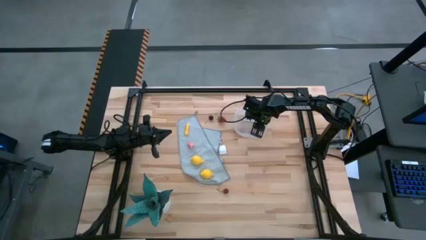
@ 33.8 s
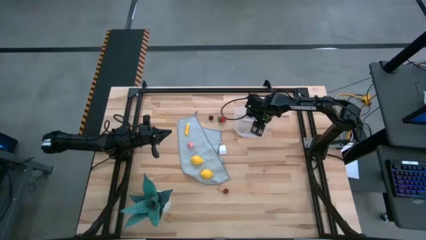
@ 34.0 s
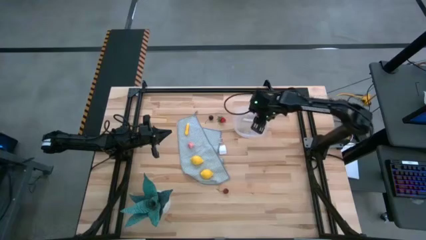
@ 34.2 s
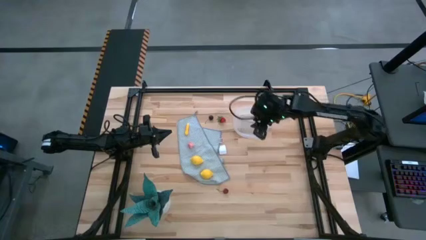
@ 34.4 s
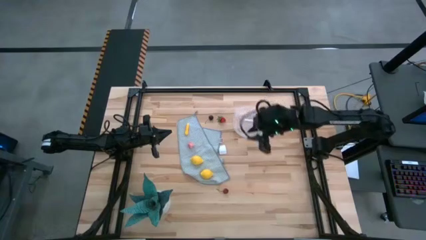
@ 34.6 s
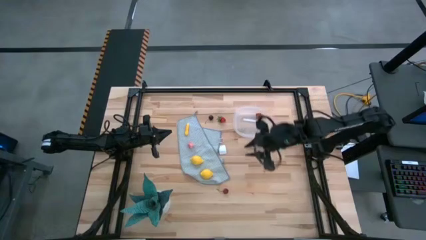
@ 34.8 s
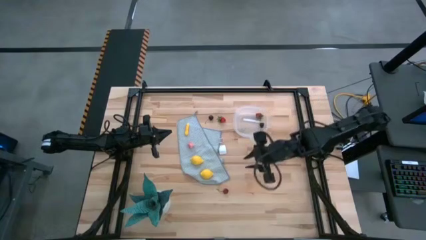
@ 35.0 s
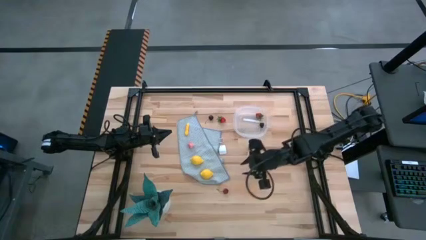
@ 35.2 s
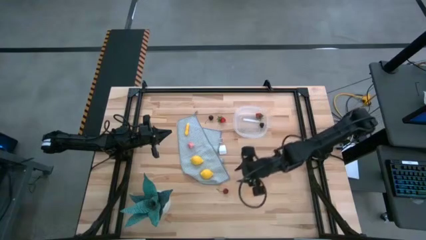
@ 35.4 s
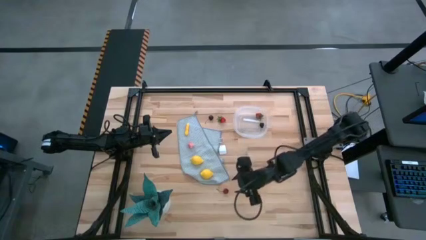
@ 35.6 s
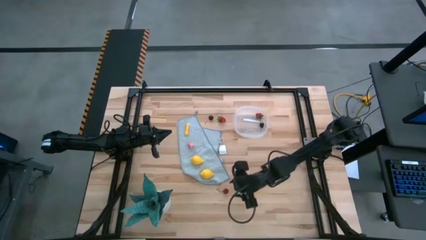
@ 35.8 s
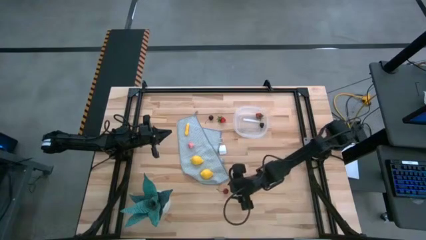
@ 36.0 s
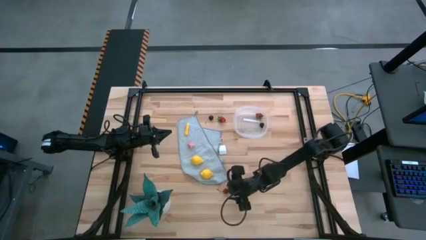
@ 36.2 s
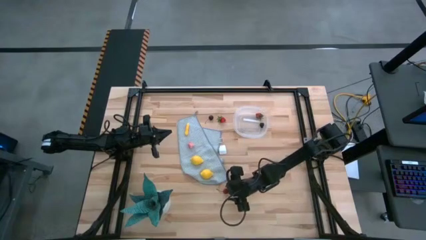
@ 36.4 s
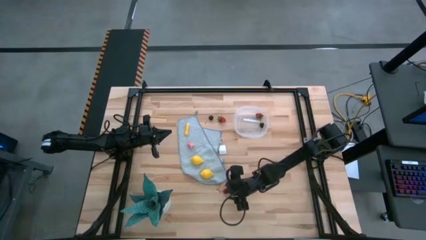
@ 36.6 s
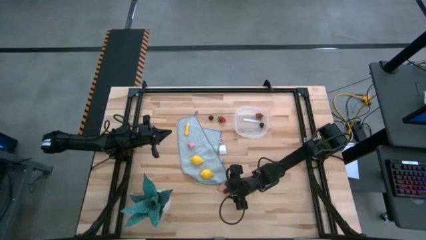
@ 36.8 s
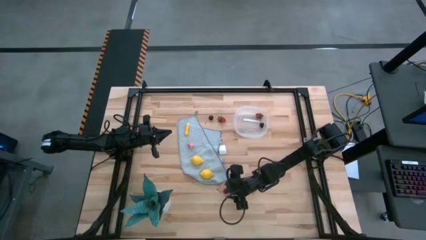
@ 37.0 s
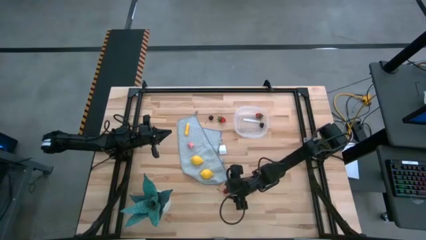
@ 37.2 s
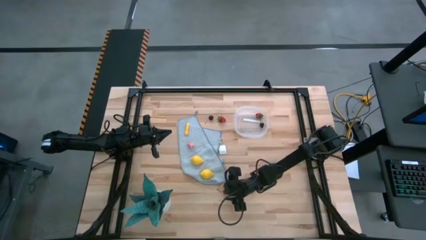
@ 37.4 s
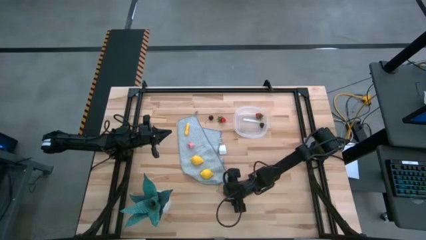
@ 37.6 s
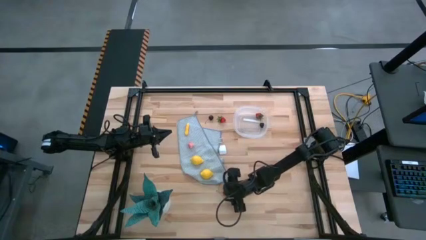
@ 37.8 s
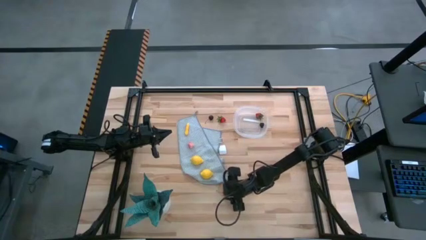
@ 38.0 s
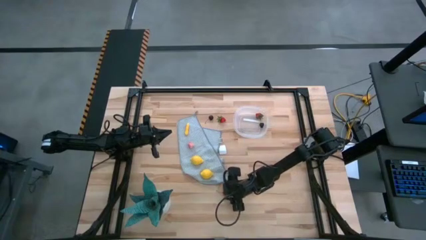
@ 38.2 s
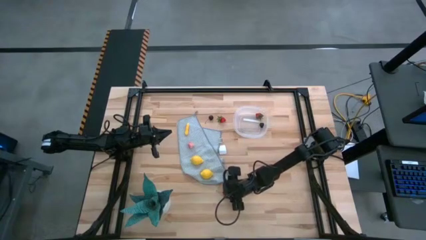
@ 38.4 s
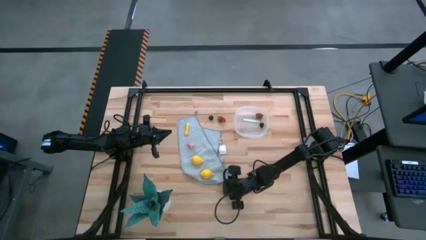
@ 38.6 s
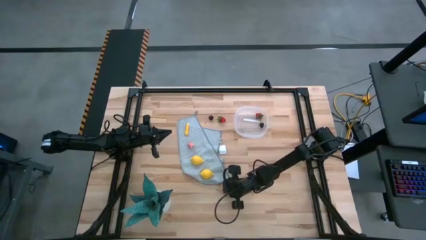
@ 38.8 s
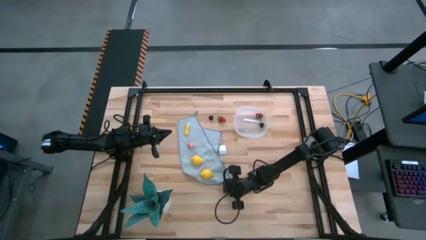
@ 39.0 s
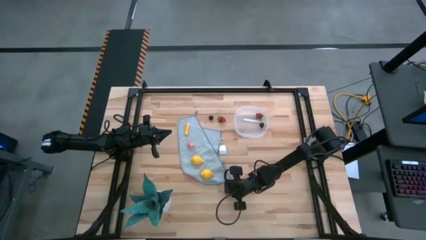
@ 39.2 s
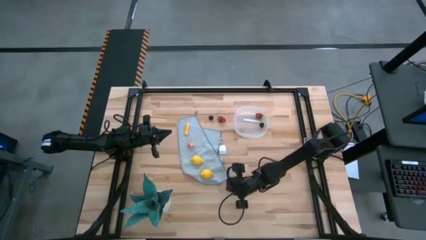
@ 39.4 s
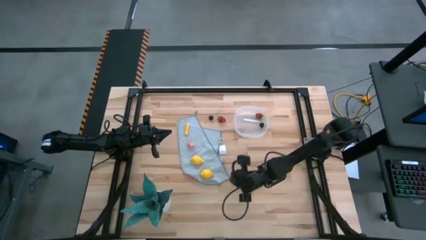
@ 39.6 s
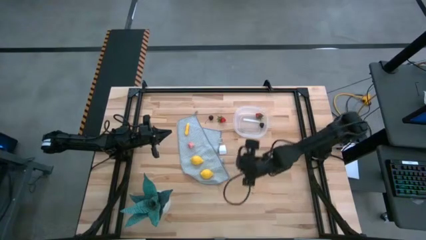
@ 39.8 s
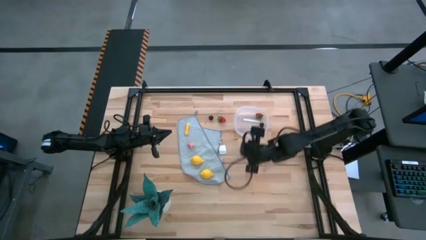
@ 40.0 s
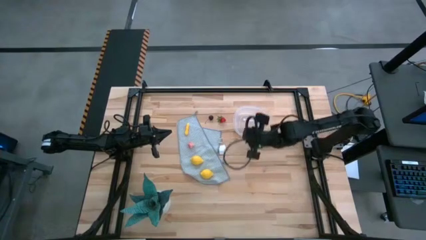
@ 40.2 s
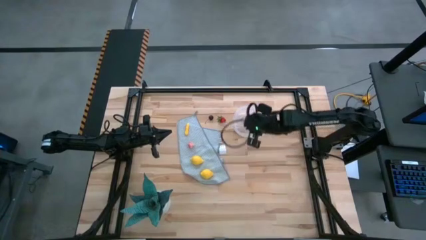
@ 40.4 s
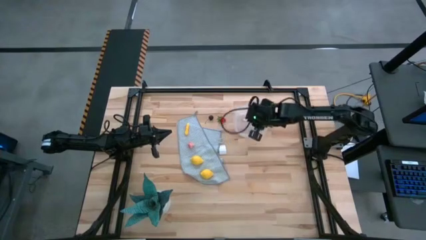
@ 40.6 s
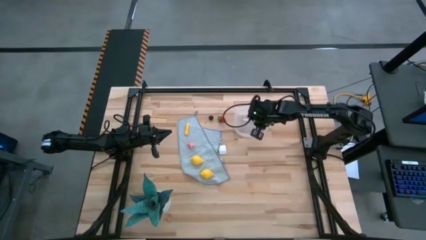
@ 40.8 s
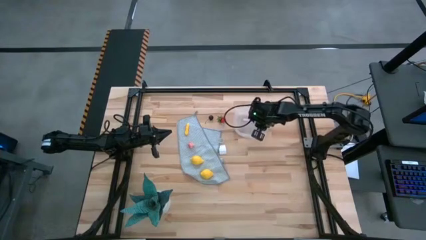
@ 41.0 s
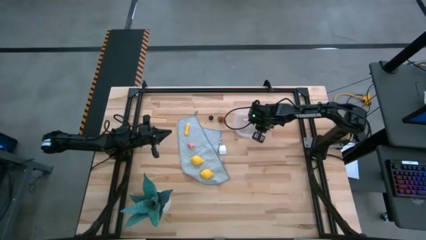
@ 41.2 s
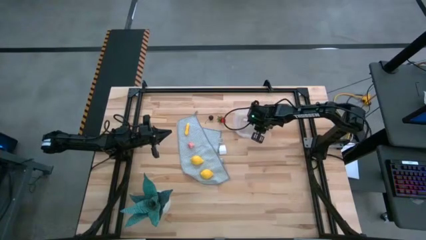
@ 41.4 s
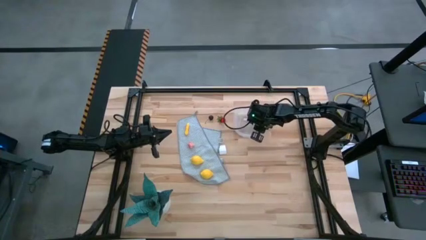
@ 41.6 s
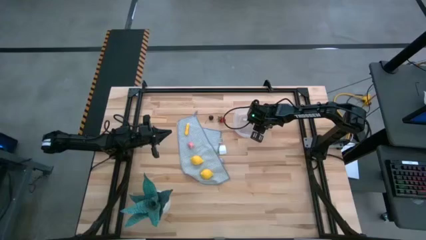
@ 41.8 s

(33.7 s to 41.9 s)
Task: Pick and placing Produce into tupperware
Put the red cherry into the transparent bin
